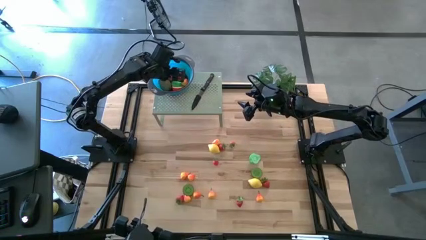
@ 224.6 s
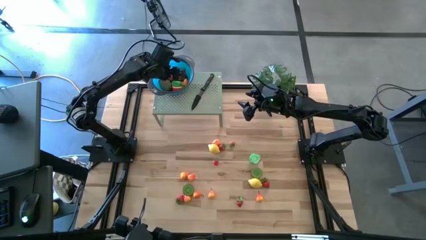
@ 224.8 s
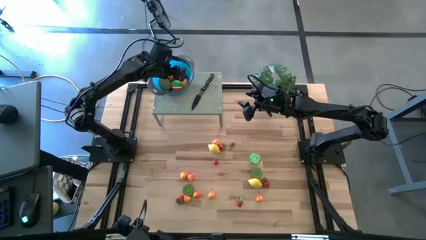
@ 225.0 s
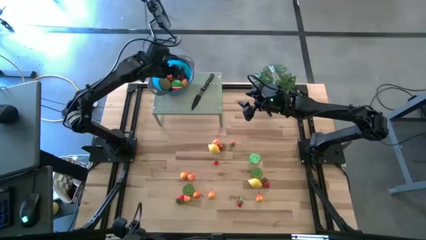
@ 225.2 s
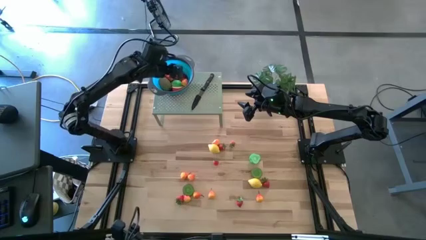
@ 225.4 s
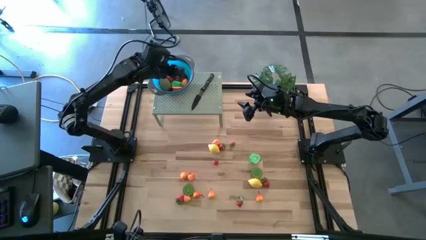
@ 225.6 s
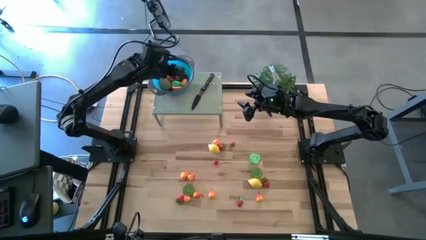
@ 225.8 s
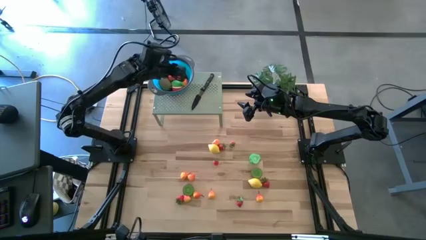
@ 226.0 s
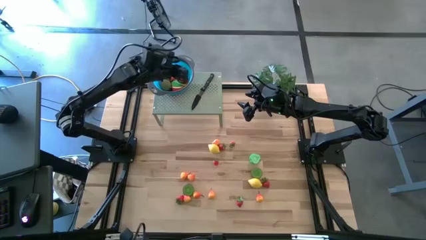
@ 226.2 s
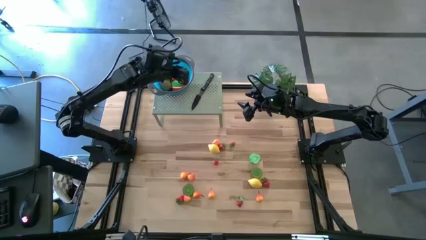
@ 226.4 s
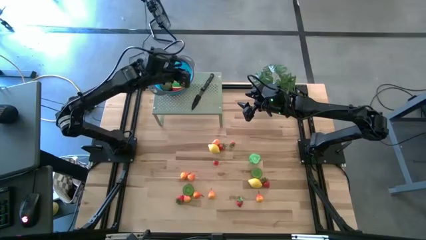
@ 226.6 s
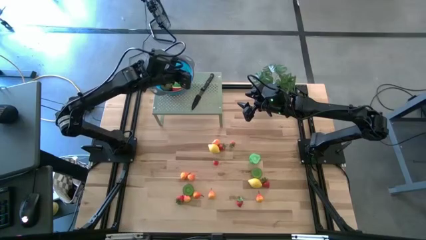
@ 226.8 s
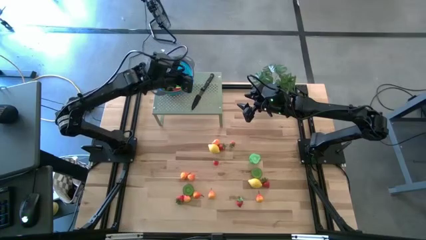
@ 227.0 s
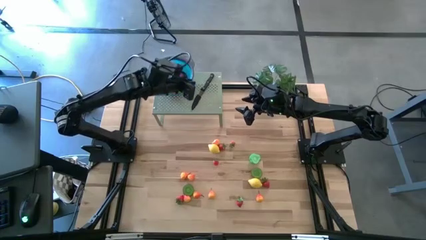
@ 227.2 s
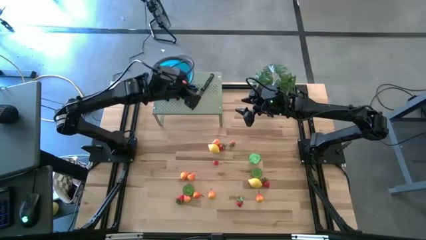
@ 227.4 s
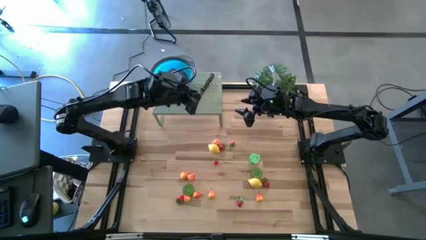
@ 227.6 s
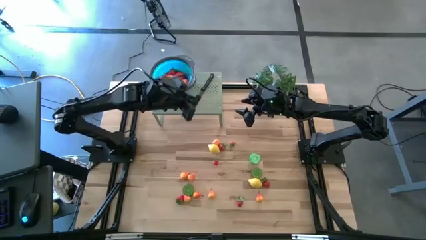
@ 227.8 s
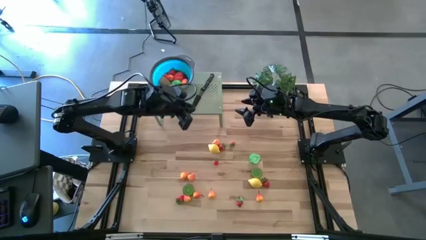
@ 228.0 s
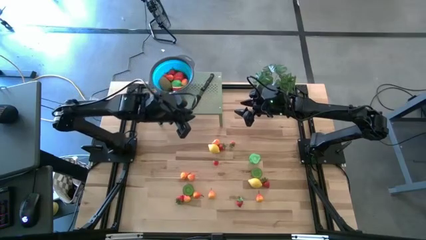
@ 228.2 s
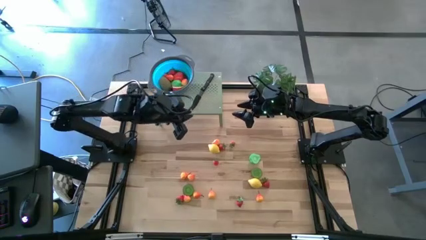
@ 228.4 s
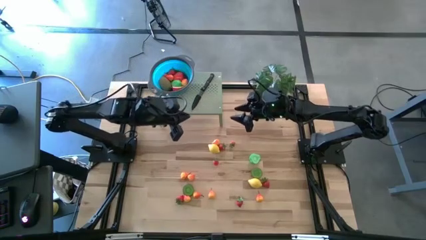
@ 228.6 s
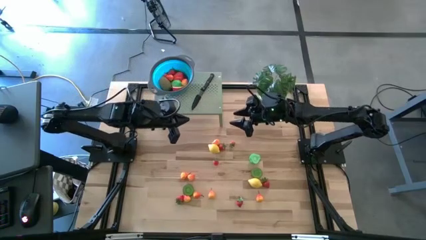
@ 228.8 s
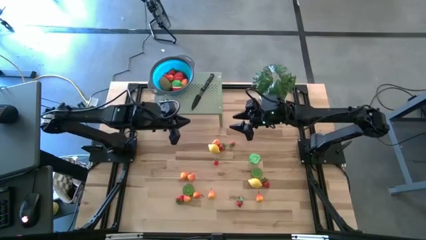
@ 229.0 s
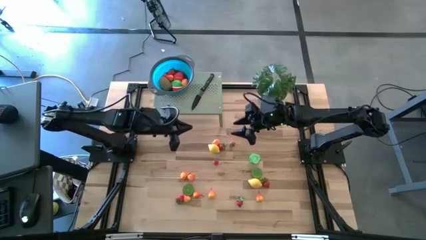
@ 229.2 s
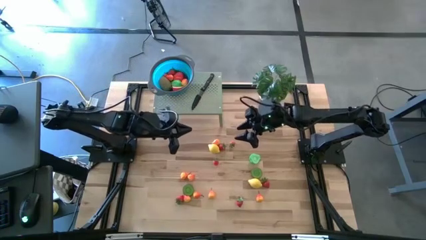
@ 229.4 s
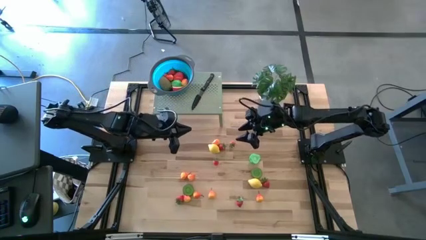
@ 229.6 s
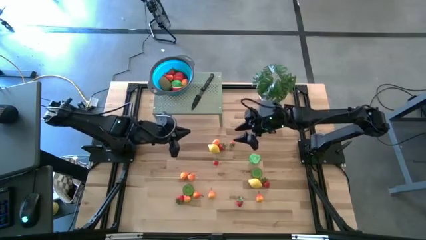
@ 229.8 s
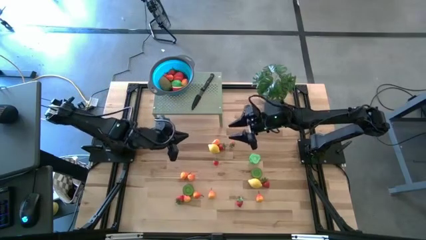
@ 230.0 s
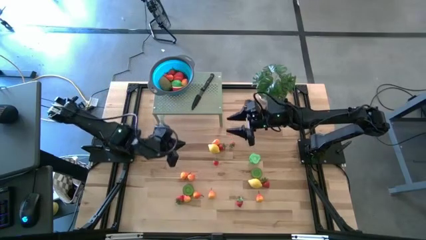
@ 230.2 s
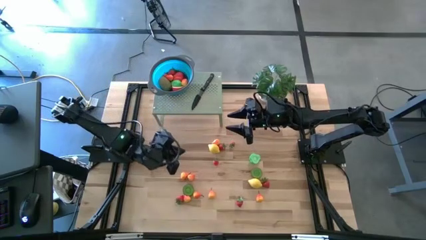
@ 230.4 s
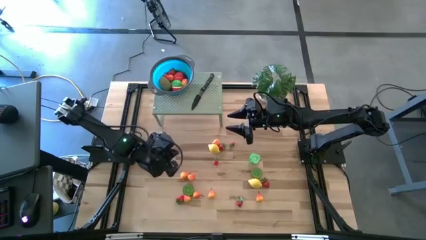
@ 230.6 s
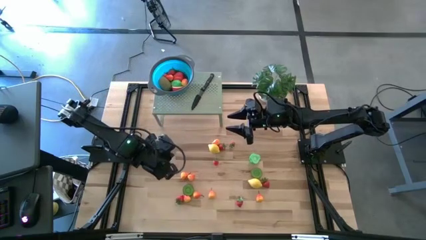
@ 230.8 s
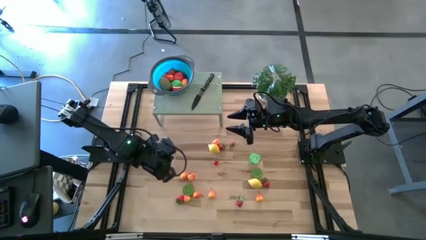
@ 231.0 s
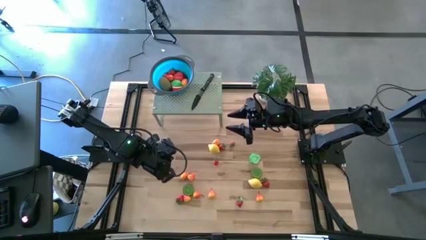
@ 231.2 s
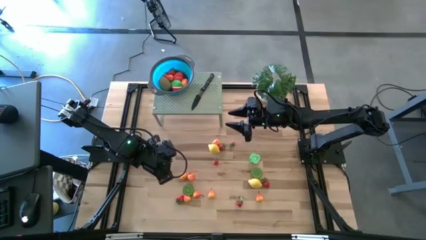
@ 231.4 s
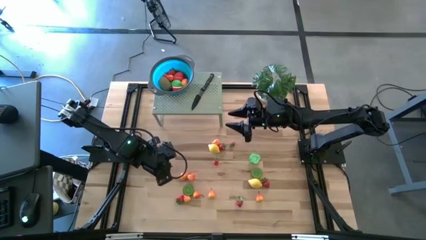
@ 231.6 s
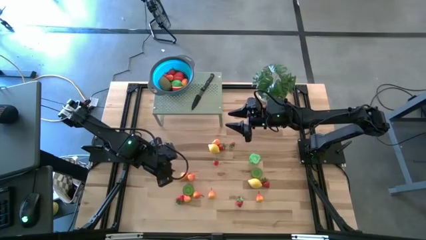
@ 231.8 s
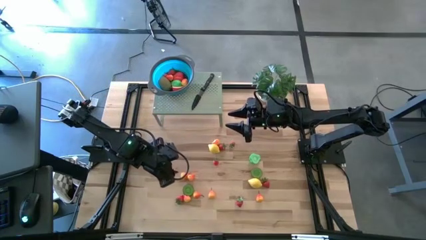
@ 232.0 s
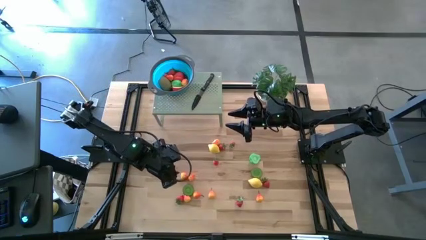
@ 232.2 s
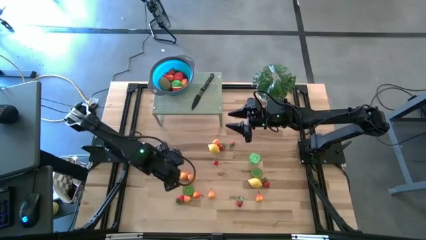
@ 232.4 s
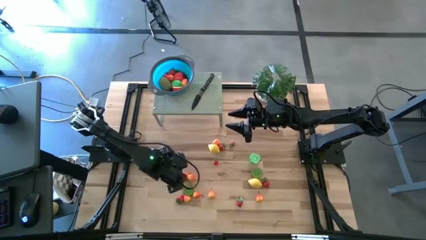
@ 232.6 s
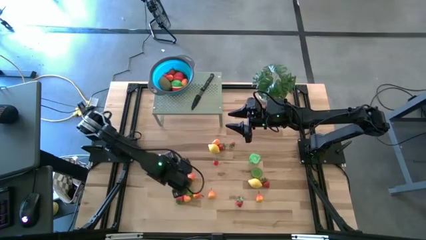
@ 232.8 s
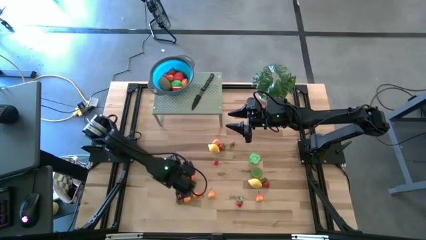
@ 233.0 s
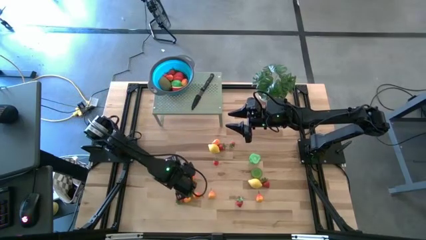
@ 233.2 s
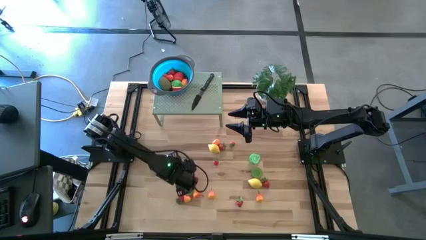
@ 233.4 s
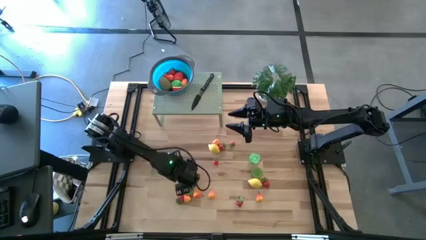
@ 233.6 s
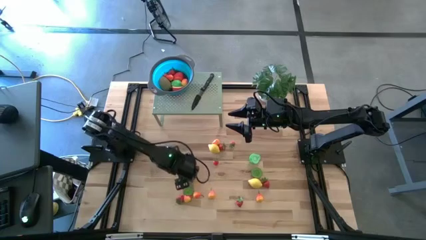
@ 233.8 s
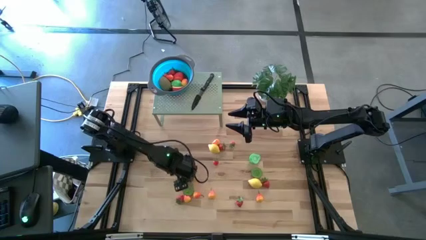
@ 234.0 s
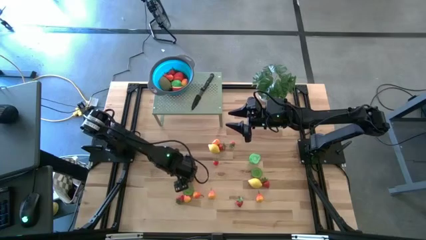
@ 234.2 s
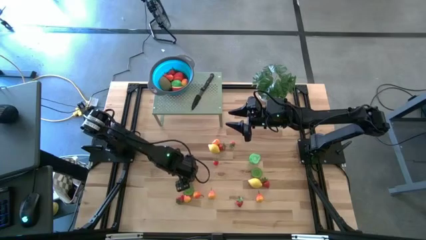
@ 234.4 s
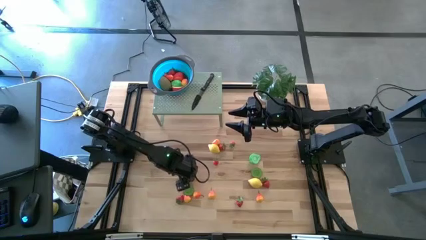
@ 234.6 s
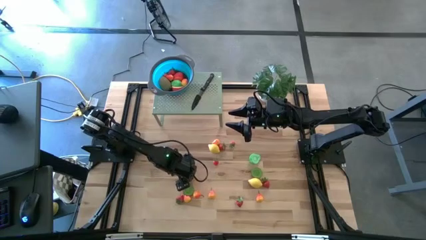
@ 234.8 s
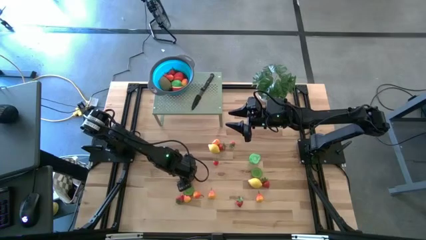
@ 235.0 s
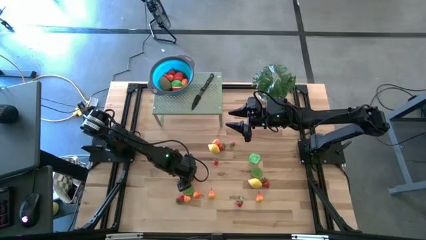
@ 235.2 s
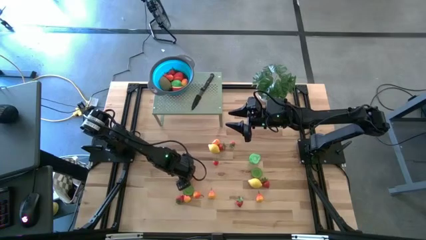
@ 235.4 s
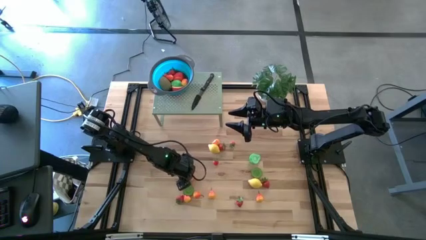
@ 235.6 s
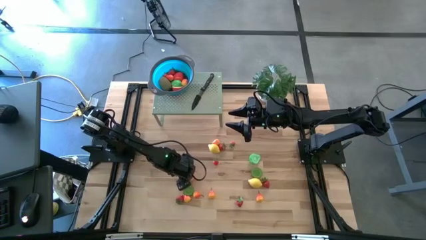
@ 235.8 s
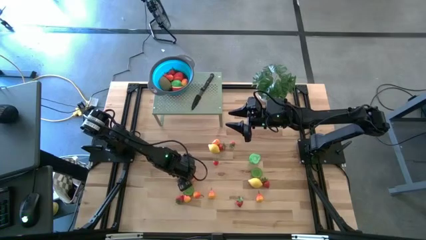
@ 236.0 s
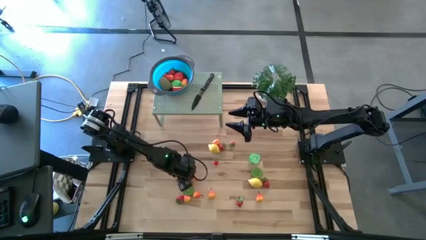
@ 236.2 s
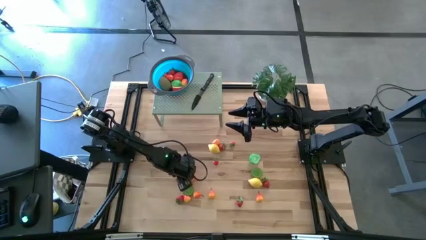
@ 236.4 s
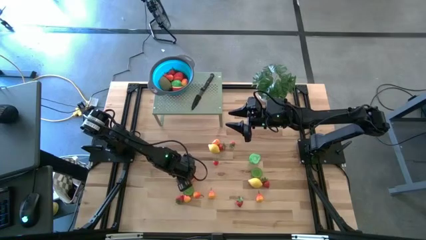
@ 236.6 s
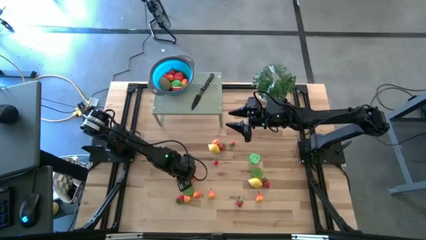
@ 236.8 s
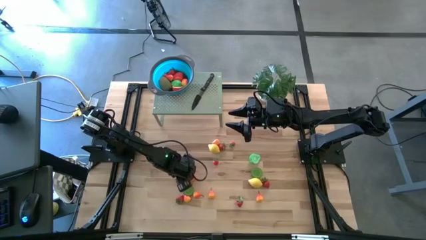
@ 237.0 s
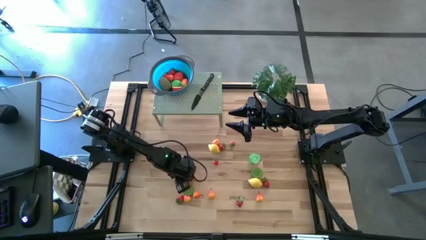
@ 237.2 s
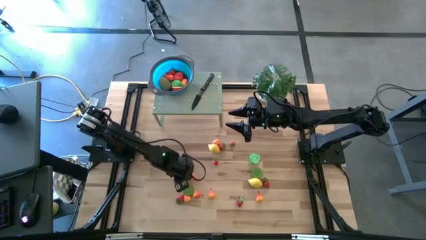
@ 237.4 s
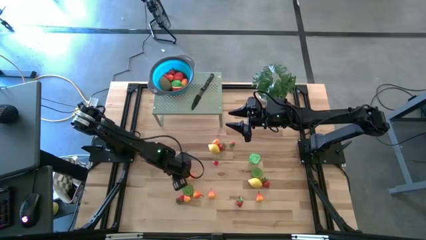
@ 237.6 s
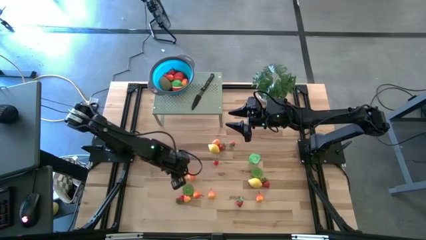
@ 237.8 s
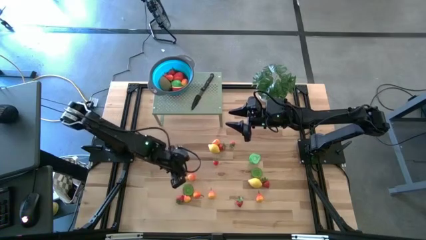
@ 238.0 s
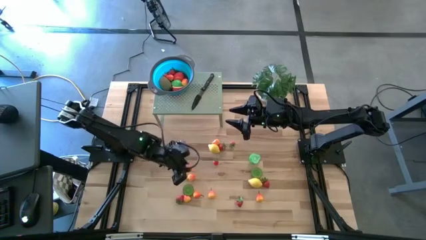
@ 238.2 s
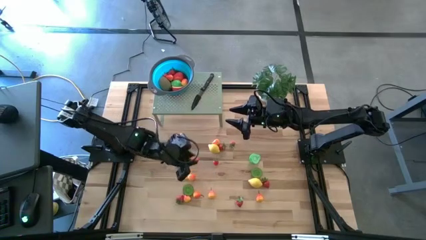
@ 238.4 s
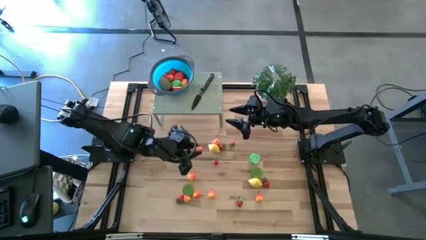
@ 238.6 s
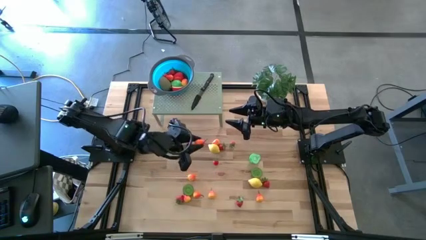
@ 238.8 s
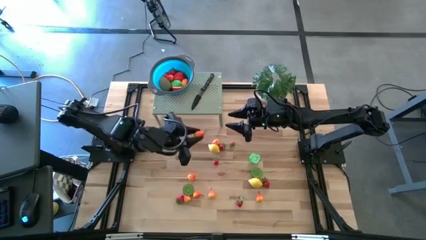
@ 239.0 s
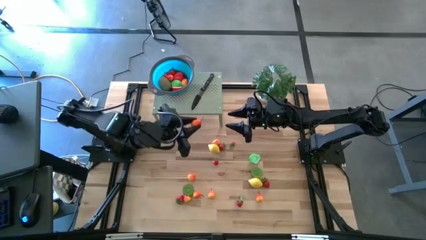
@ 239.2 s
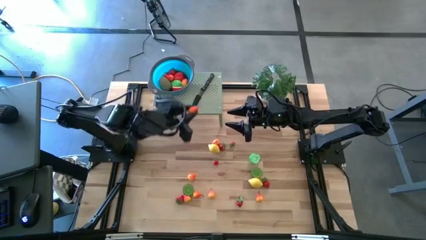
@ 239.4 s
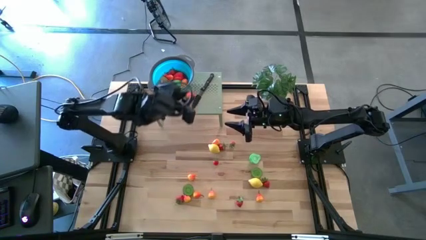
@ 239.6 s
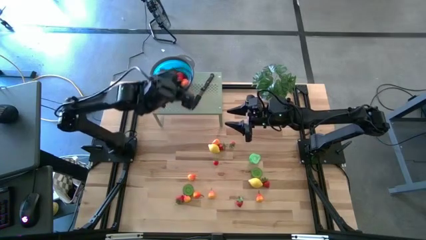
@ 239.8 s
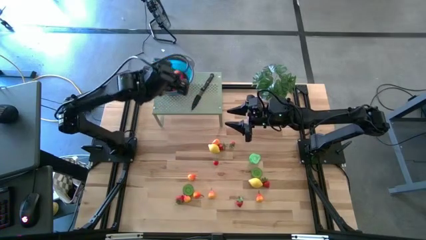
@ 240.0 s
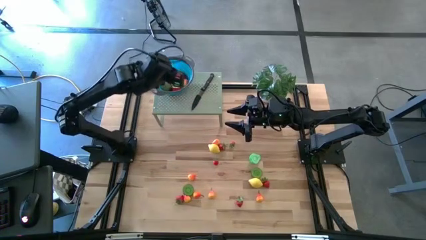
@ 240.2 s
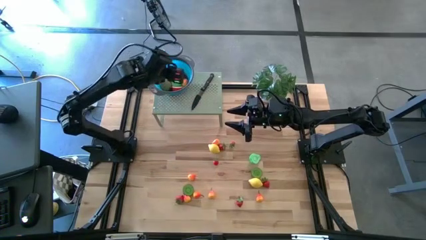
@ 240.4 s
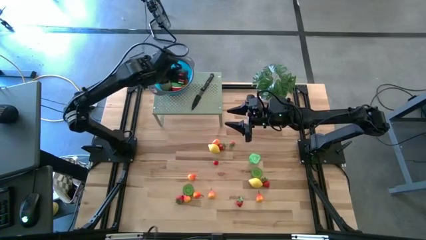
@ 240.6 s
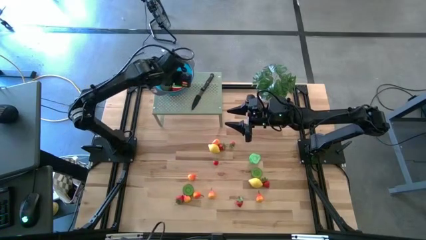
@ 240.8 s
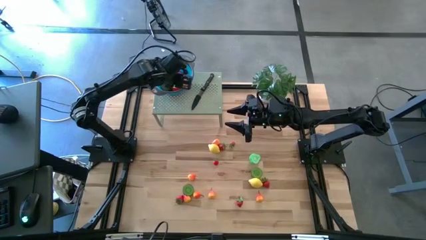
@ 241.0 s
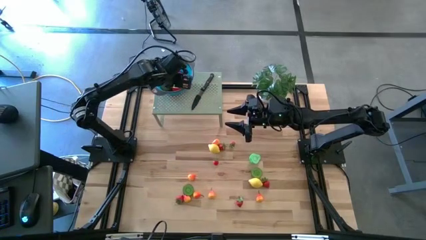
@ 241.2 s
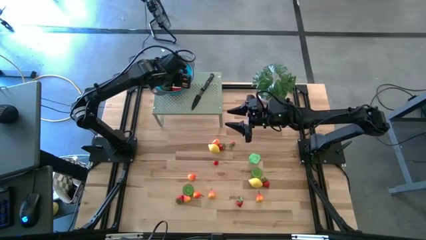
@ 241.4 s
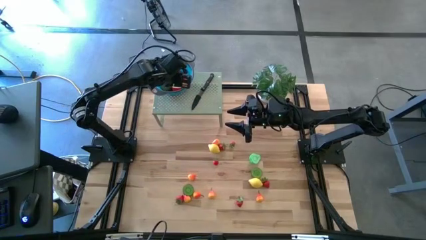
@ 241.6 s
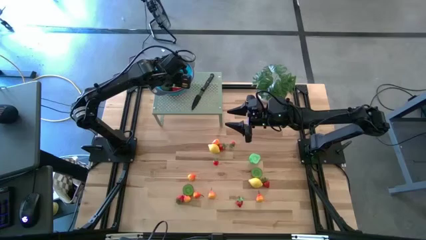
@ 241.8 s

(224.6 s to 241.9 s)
Task: Pick & Place Fruit
Put the orange pear into the strainer bowl on the shelf
